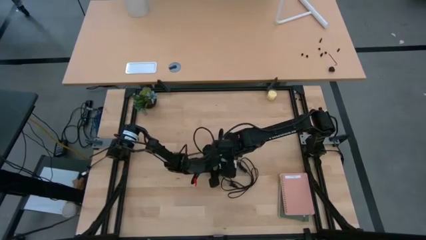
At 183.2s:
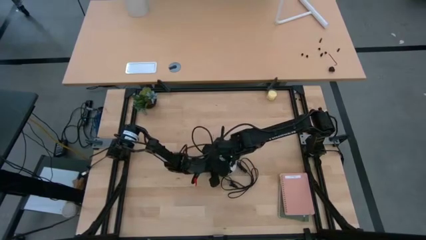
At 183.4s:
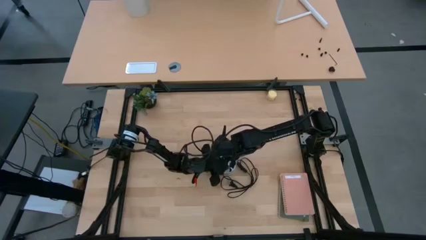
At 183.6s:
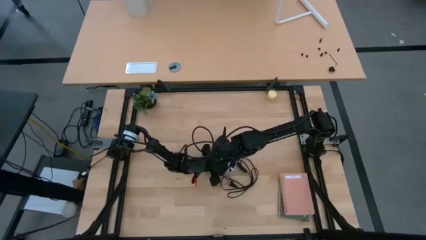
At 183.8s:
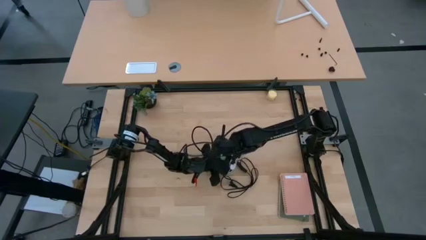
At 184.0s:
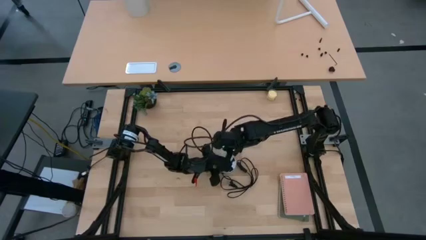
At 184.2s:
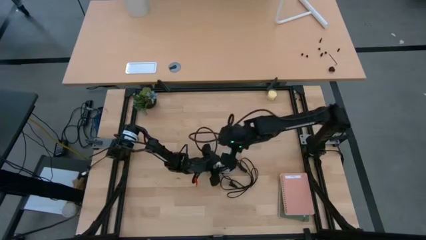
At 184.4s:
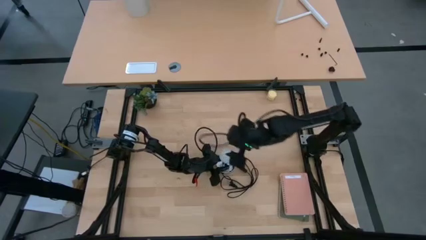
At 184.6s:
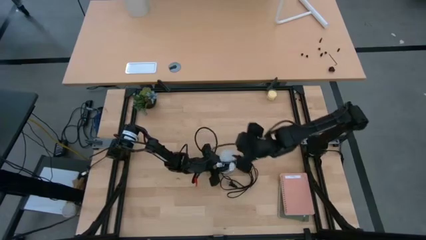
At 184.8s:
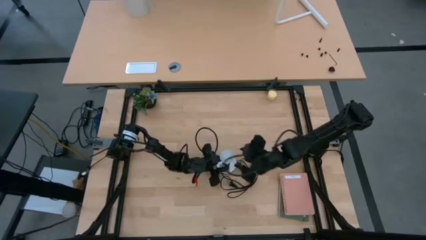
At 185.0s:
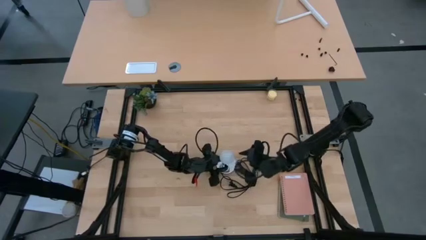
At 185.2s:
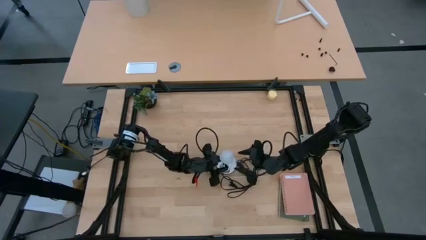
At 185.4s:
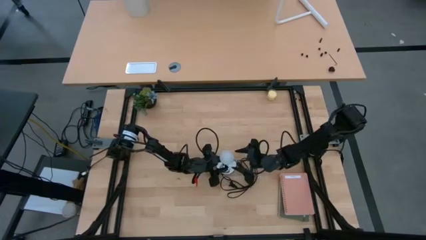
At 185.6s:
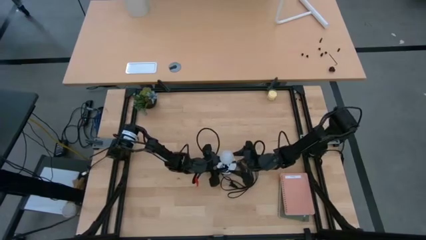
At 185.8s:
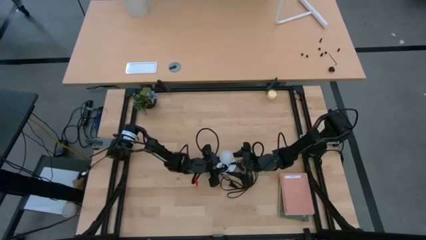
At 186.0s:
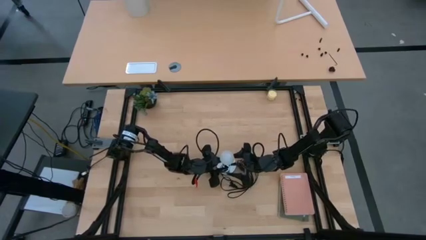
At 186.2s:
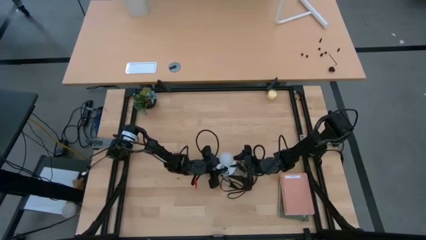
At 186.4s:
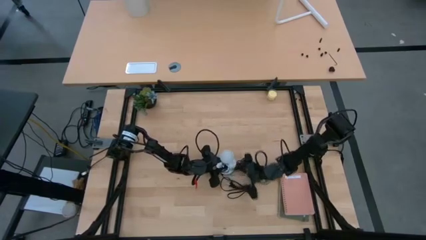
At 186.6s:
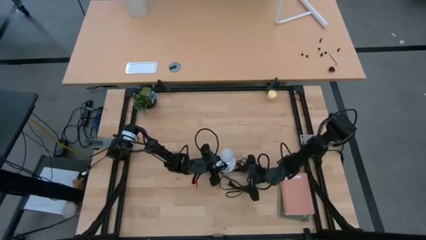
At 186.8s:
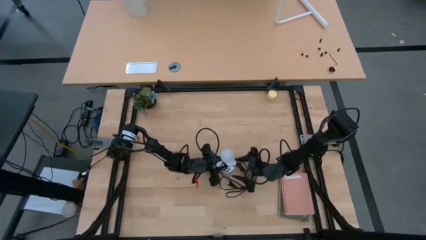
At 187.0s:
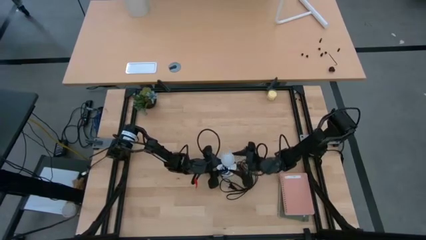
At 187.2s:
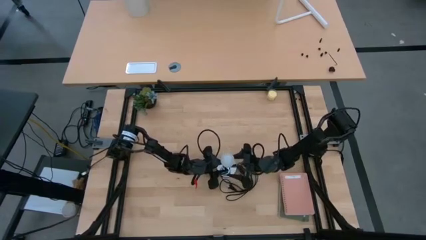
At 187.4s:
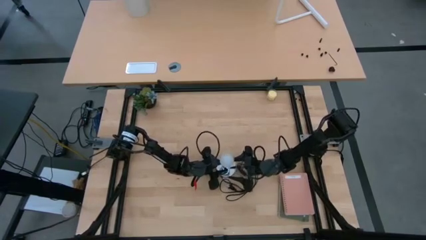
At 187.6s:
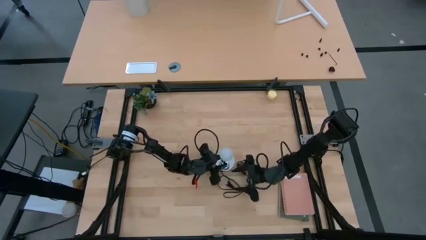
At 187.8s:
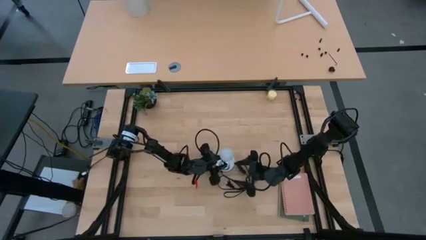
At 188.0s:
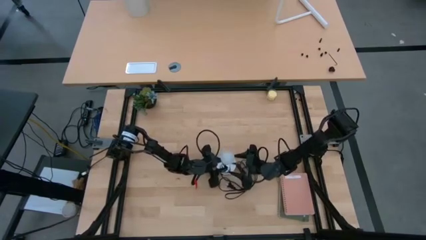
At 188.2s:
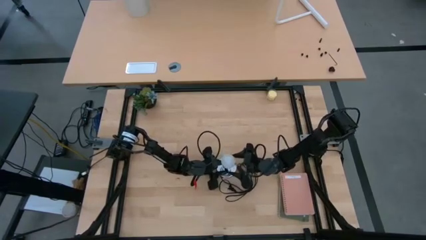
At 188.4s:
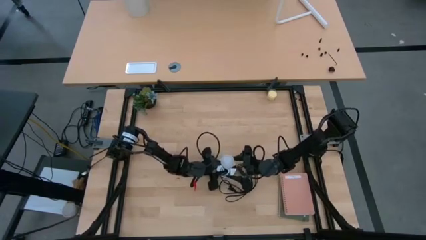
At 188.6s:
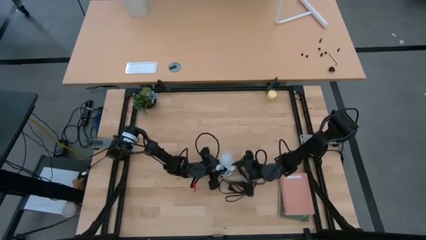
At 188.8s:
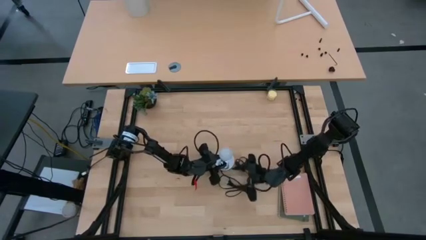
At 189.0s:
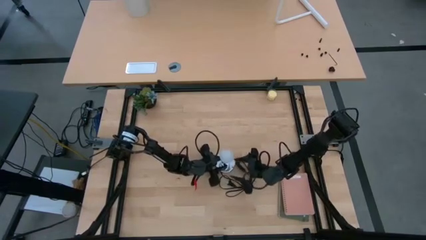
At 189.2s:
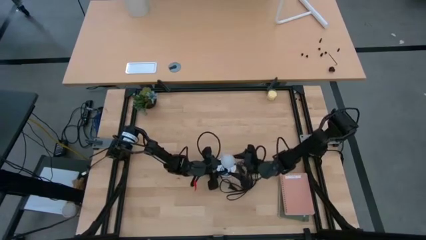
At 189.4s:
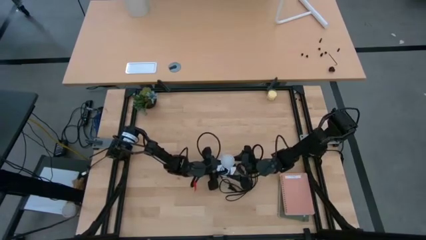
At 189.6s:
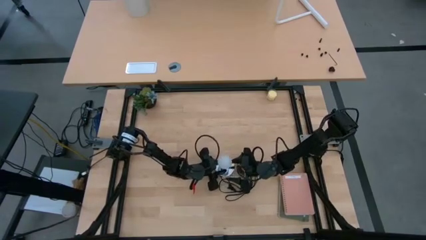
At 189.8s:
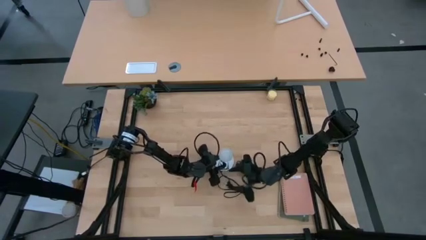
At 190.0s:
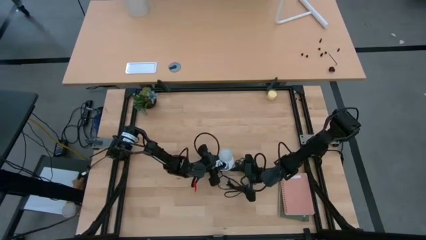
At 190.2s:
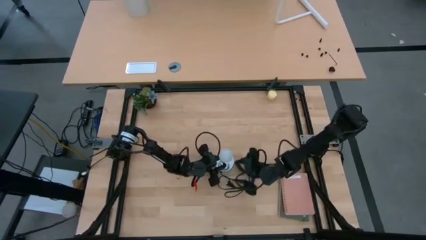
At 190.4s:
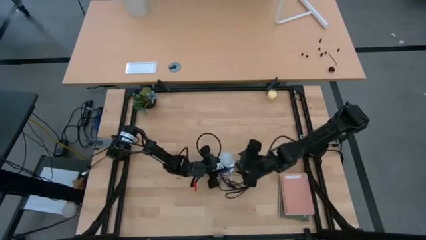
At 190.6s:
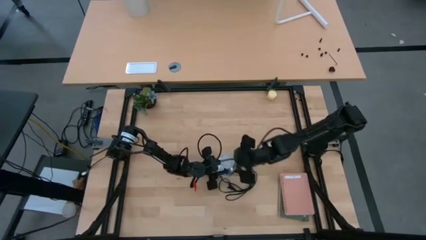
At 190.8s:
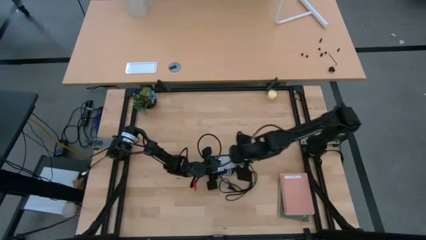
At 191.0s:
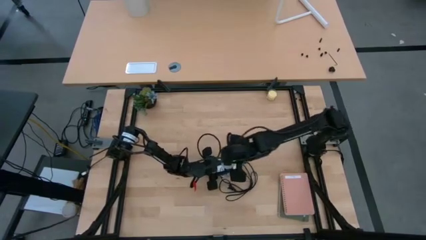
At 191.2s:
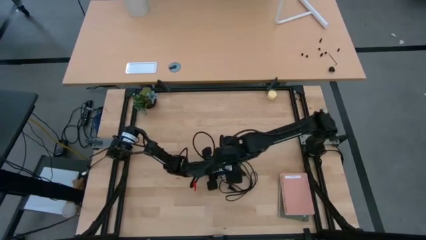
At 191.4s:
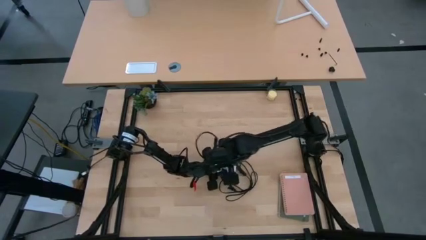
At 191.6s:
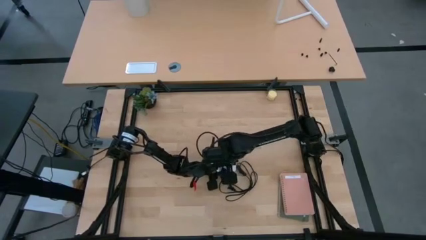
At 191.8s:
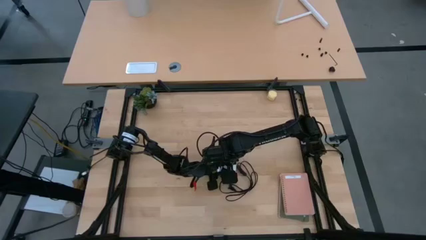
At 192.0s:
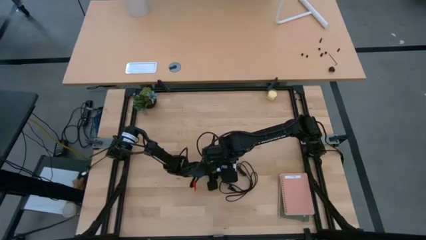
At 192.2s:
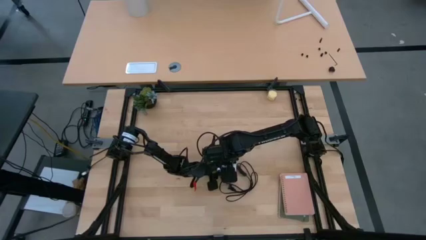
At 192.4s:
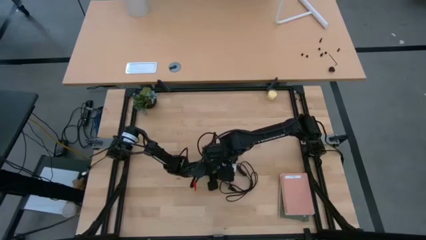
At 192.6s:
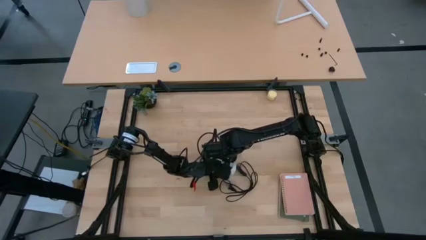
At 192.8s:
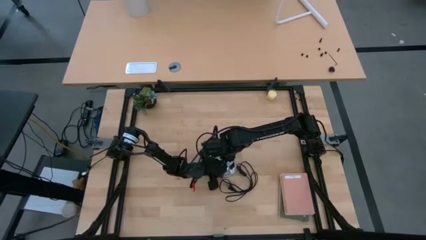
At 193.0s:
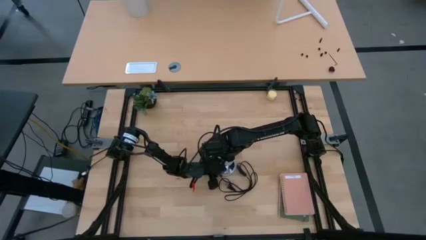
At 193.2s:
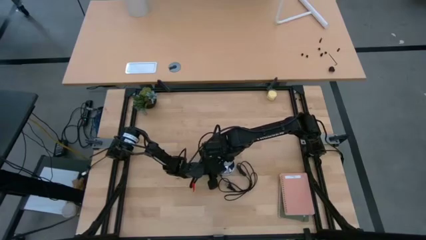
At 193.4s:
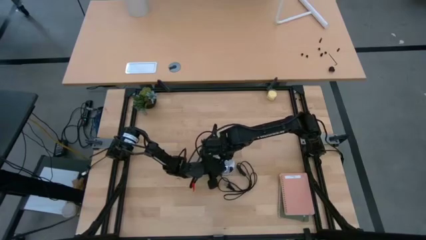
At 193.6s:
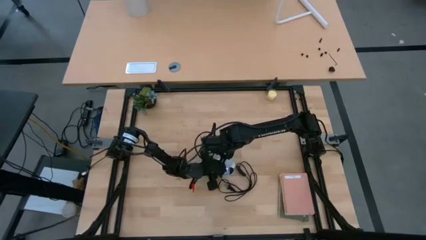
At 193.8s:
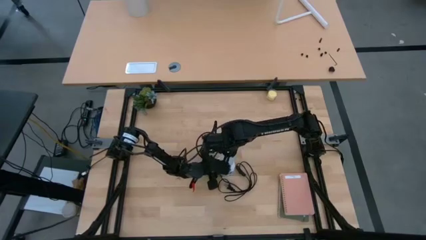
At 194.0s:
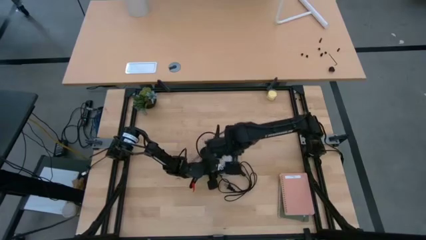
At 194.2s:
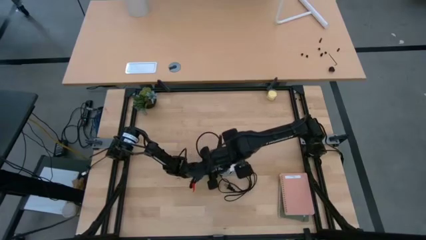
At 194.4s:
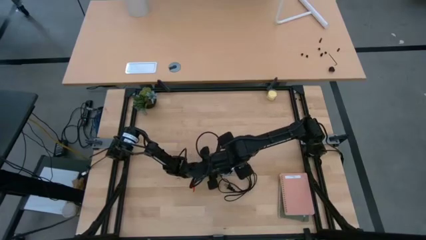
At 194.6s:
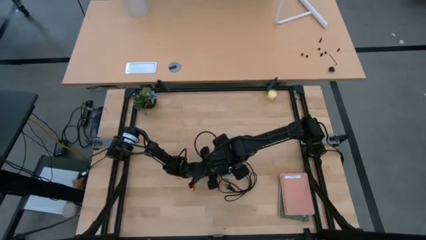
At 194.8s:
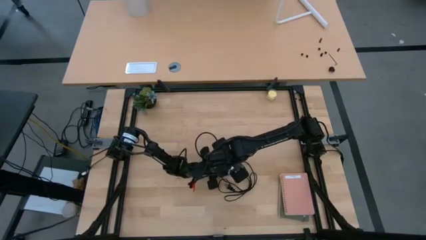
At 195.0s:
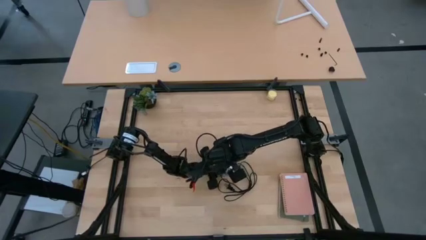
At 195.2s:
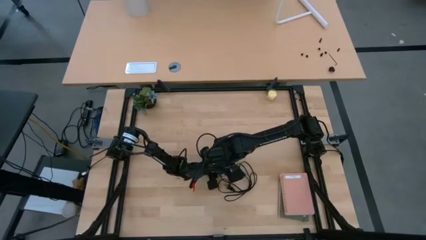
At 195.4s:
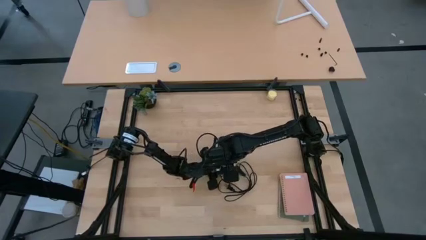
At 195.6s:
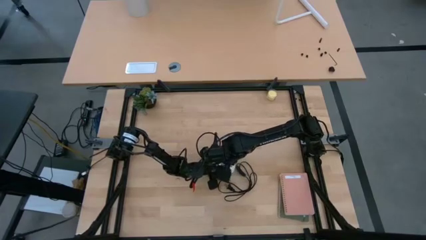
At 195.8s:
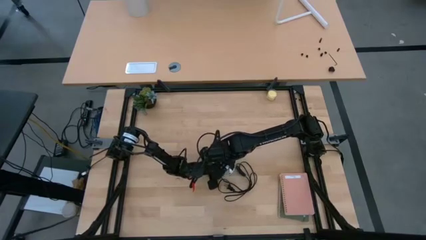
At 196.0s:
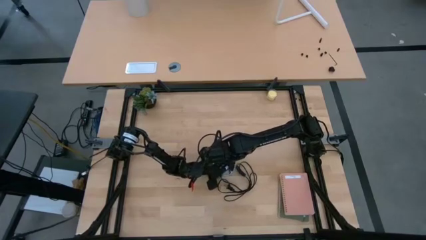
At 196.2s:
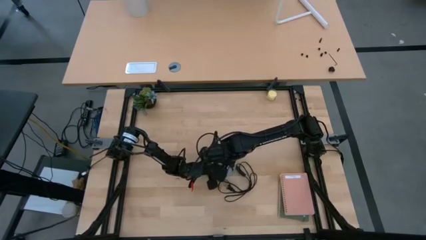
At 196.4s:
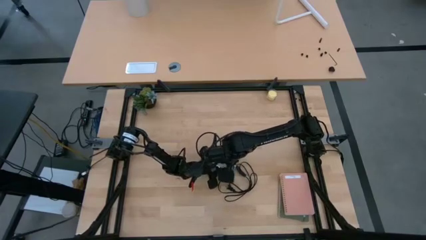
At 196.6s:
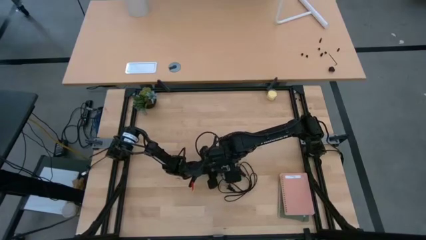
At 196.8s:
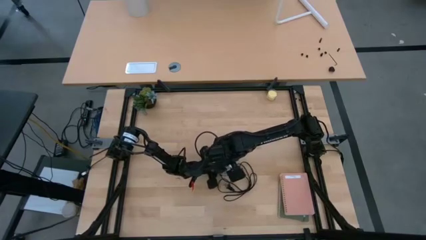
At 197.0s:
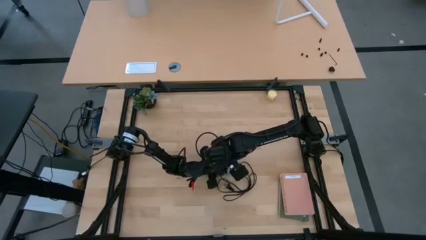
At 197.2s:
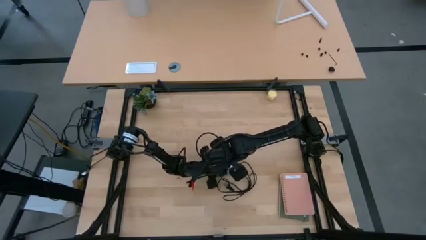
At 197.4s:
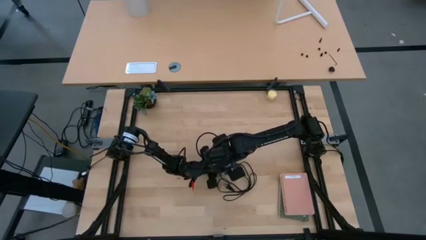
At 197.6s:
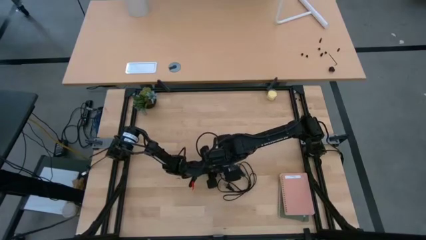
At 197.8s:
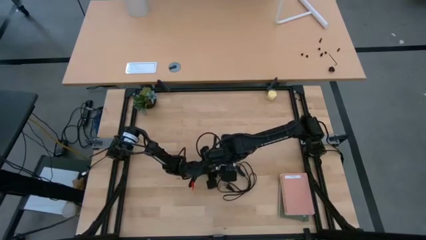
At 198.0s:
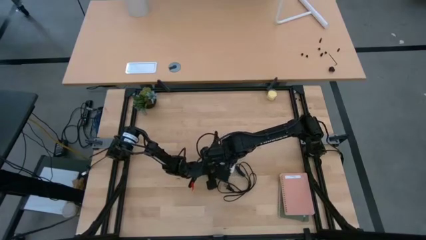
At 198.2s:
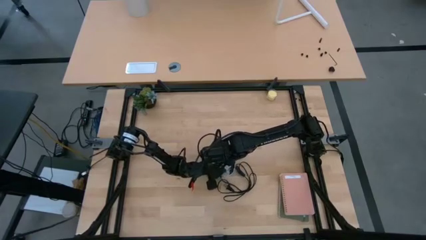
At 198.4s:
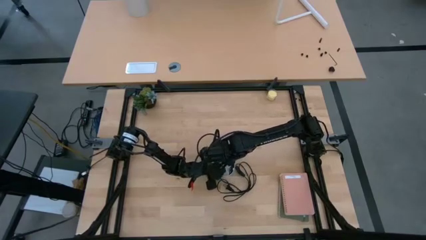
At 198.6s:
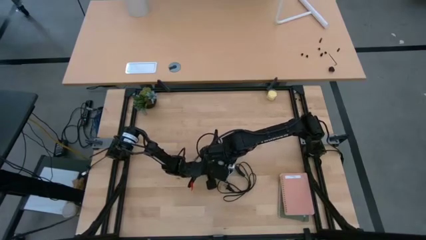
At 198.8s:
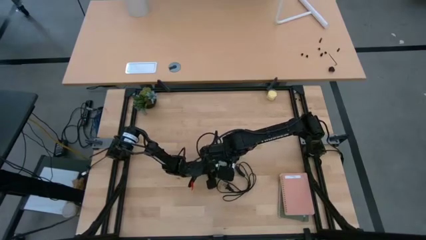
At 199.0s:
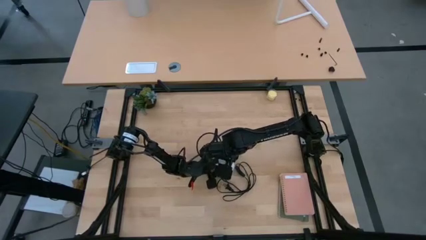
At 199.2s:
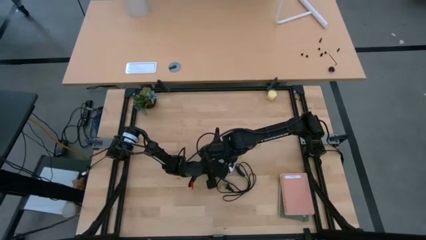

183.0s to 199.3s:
Task: Screw lightbulb
Insert the lightbulb into the lamp
